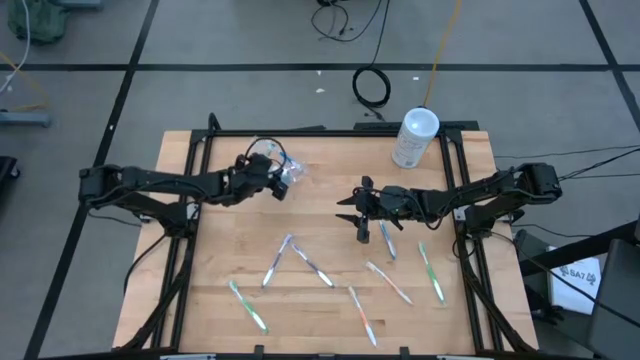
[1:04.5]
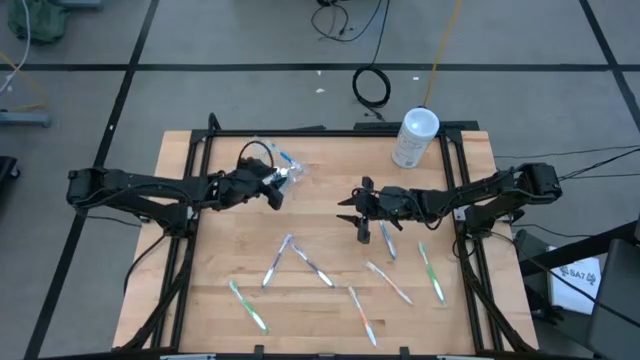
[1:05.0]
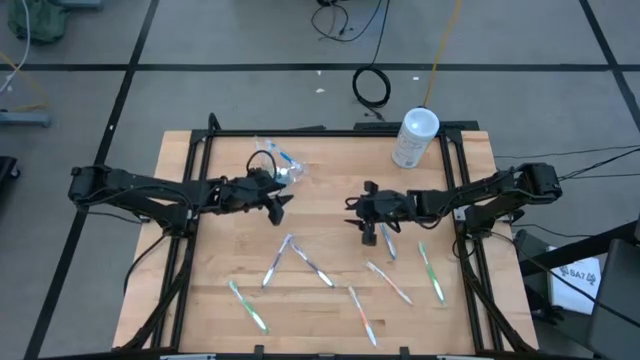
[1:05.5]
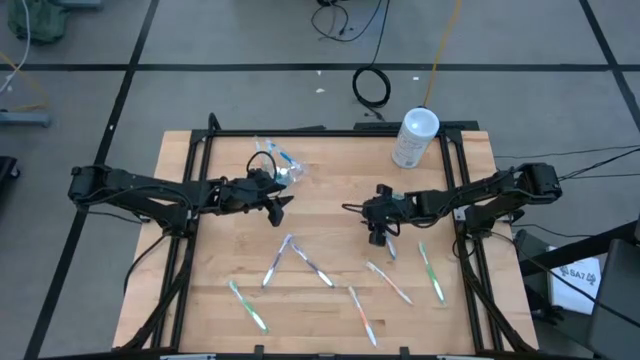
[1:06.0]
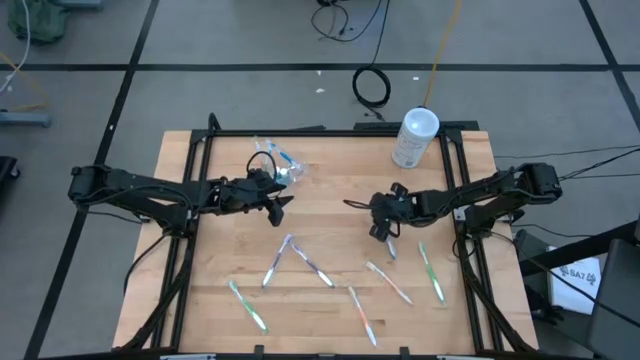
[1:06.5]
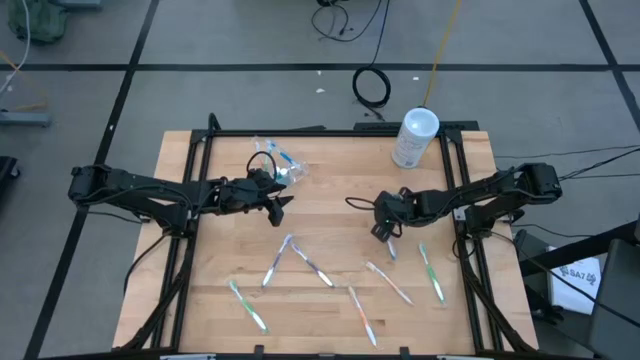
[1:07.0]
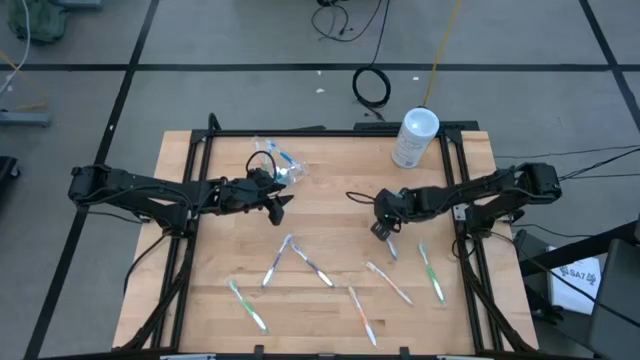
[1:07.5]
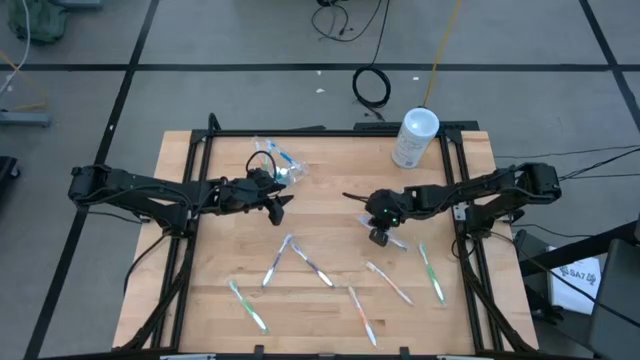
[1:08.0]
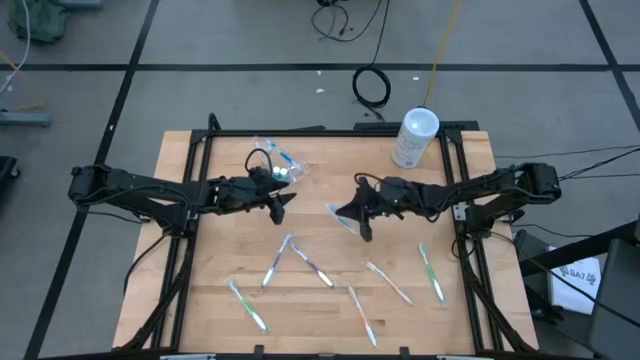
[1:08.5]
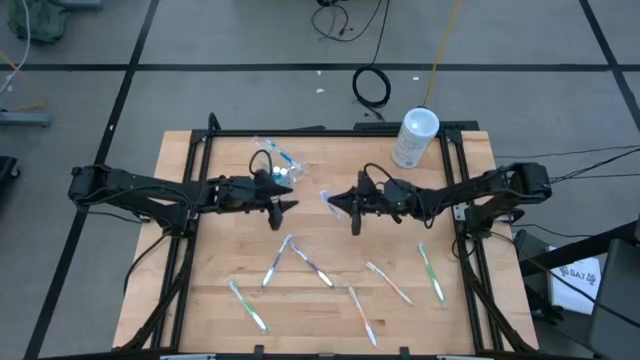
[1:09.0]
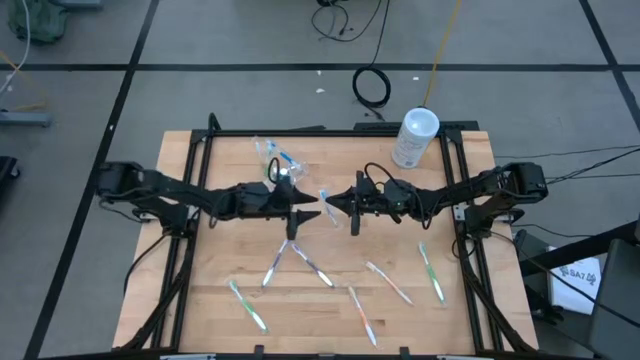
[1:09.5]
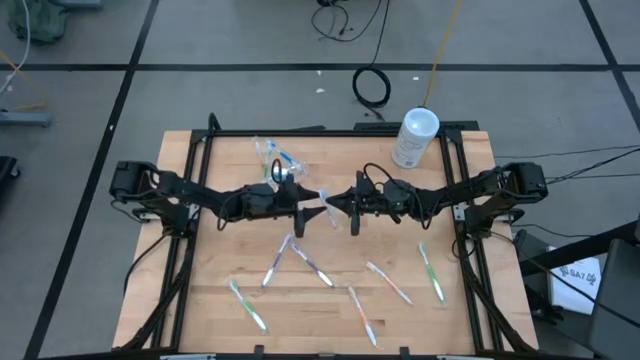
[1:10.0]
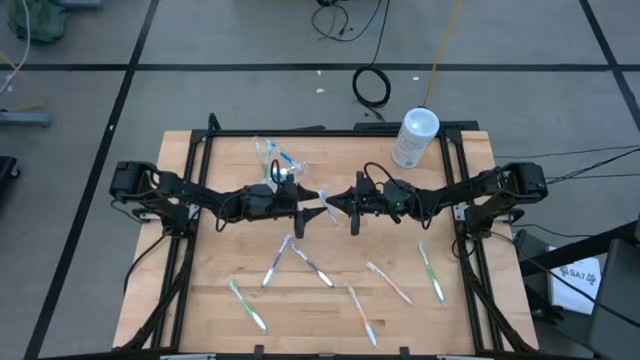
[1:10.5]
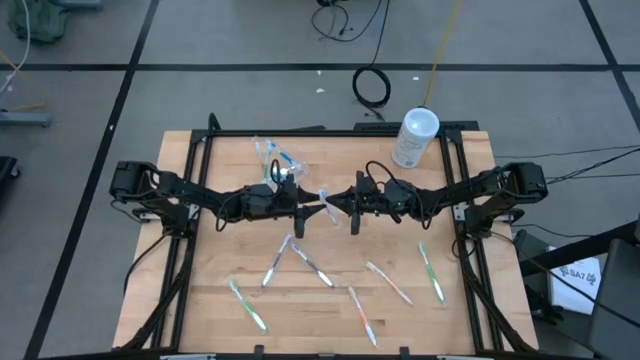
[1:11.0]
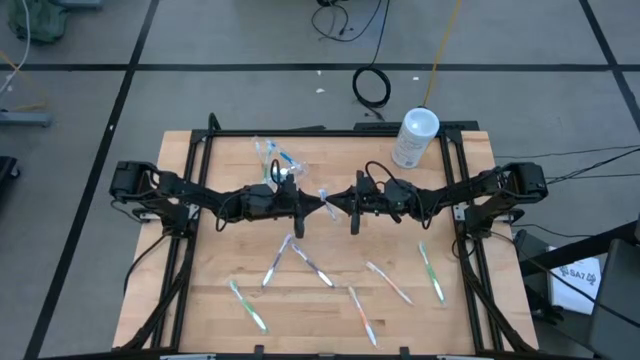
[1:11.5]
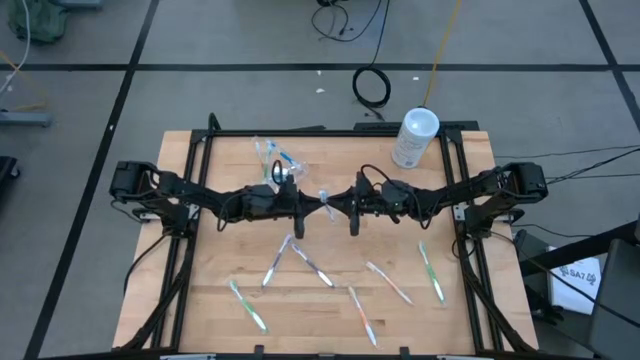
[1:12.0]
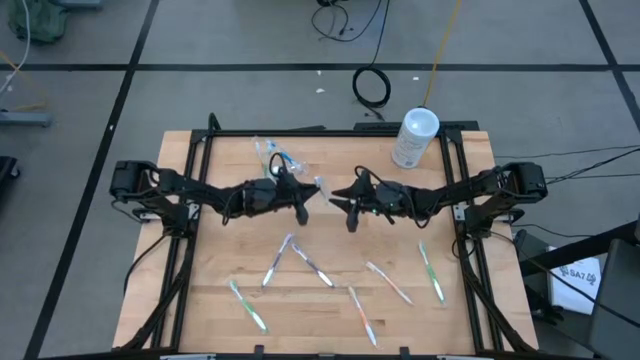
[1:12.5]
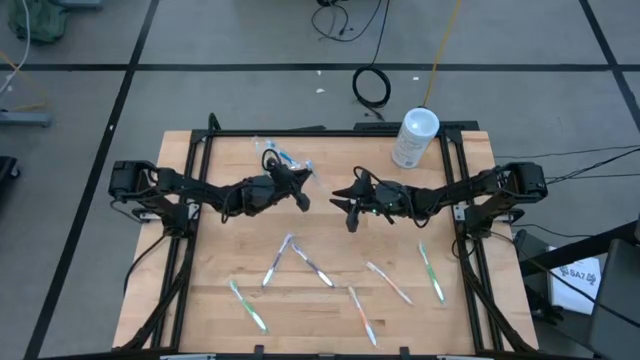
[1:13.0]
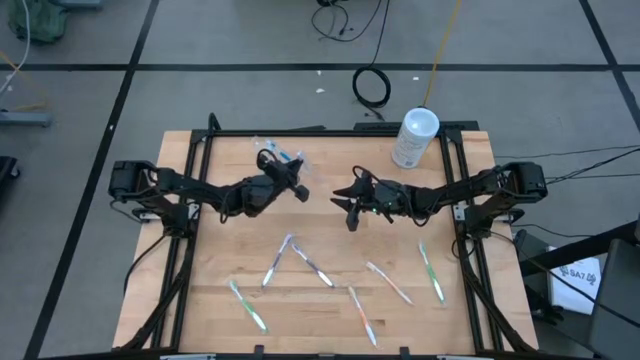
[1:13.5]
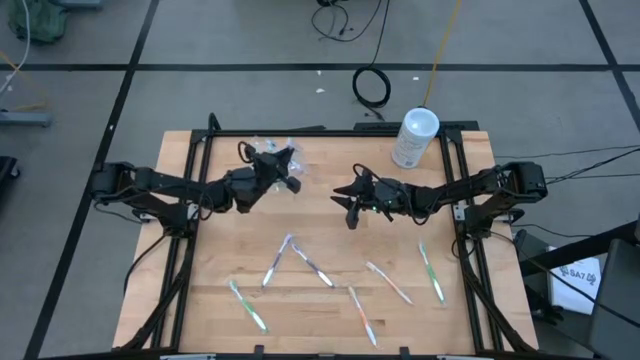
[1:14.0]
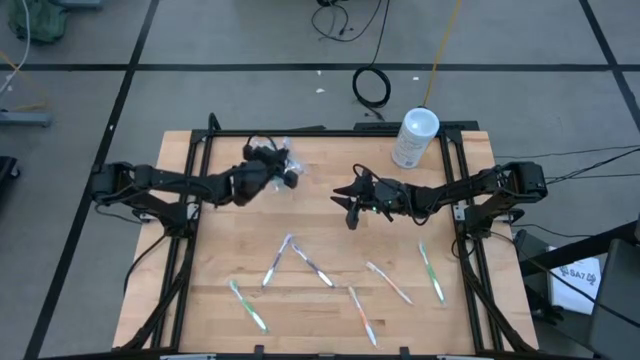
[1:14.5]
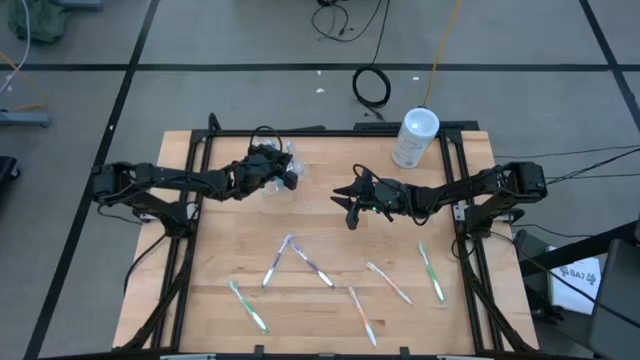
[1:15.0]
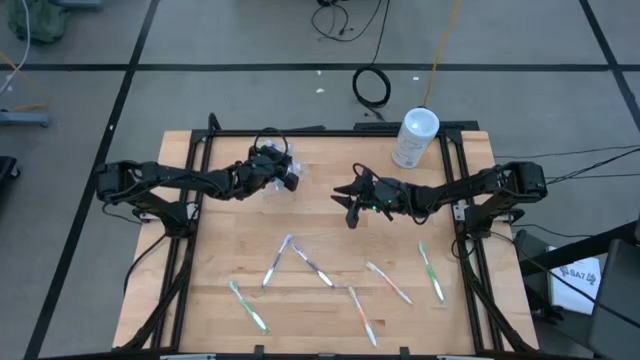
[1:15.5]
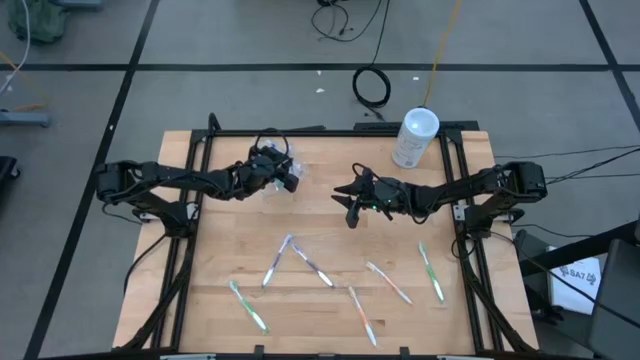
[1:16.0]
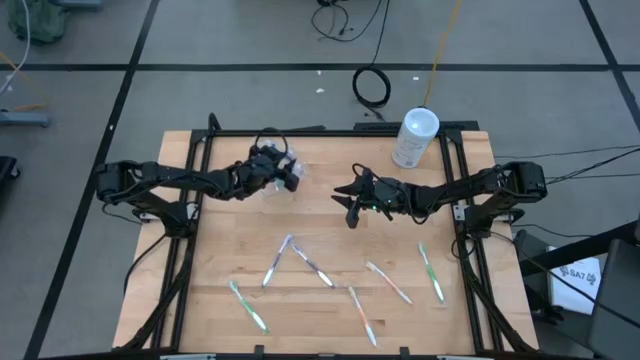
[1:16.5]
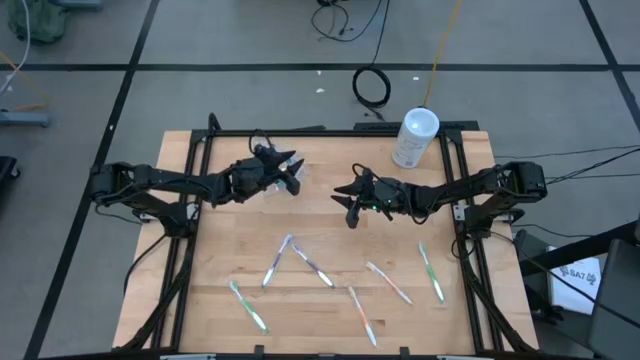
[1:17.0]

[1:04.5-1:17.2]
Task: Pick & Place toothbrushing station
Put the blue toothbrush into the transparent organizer

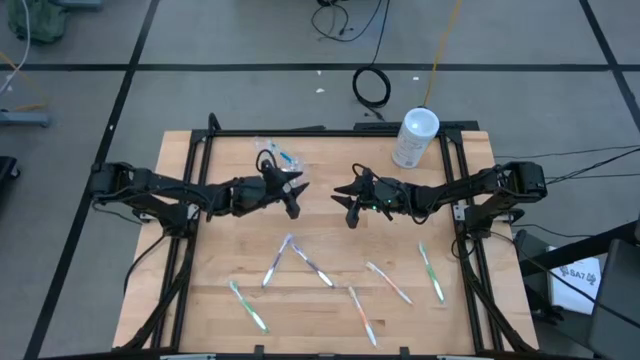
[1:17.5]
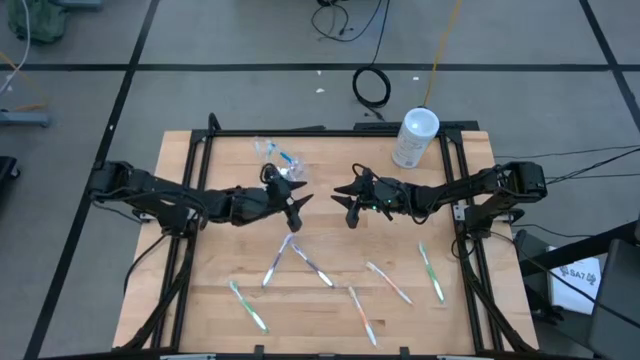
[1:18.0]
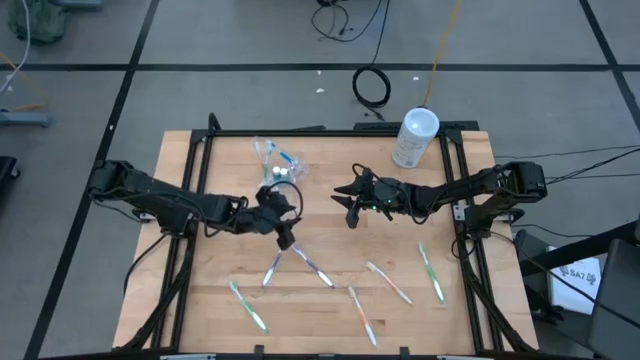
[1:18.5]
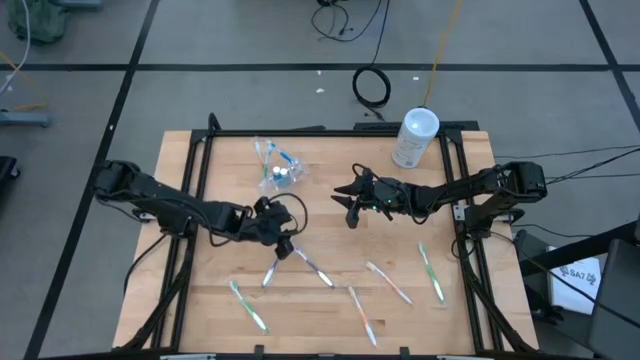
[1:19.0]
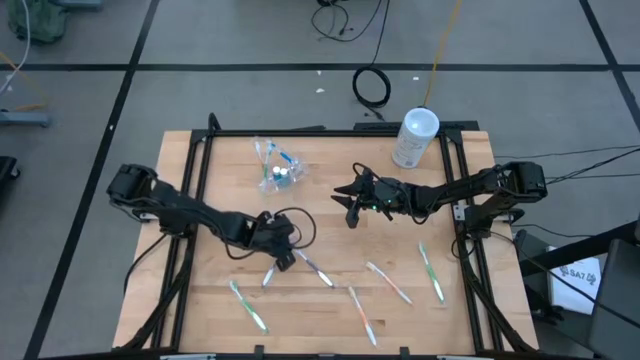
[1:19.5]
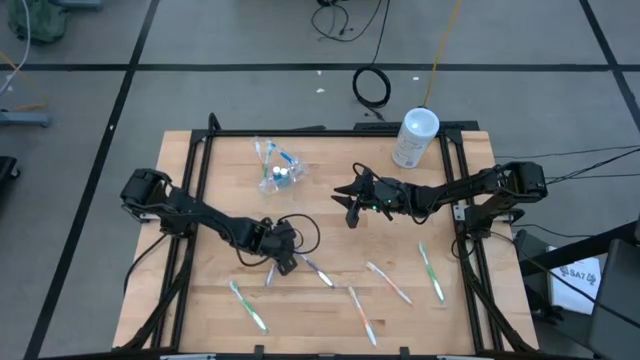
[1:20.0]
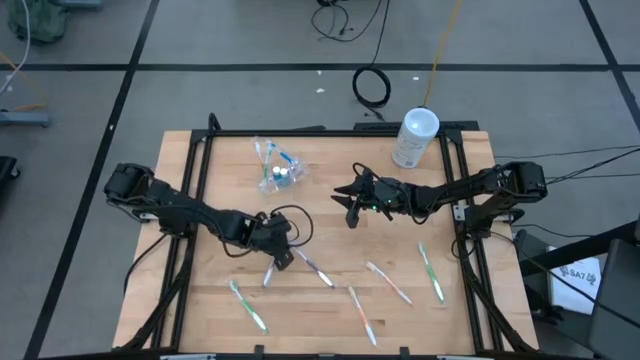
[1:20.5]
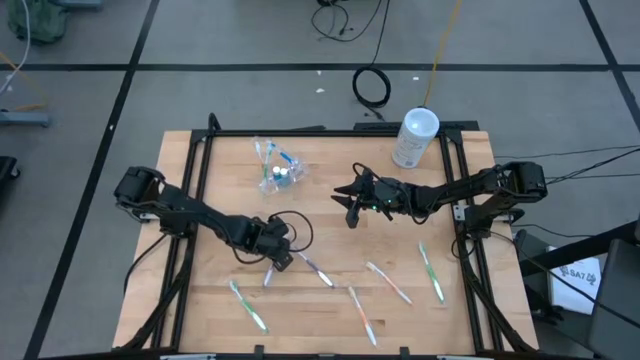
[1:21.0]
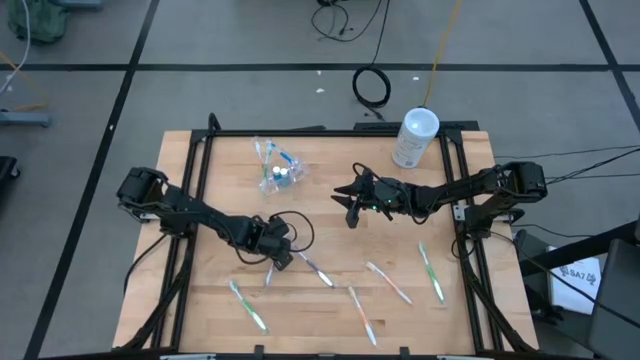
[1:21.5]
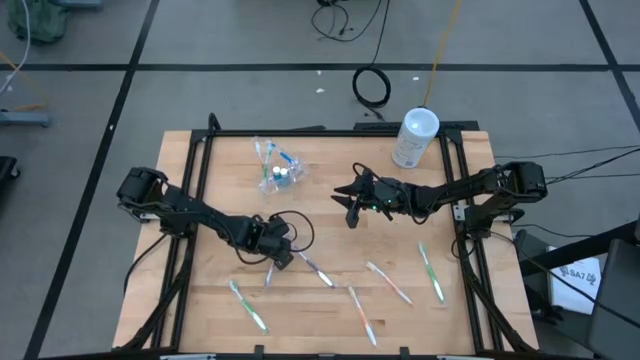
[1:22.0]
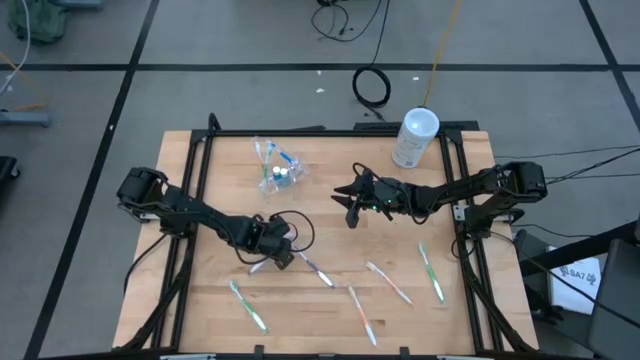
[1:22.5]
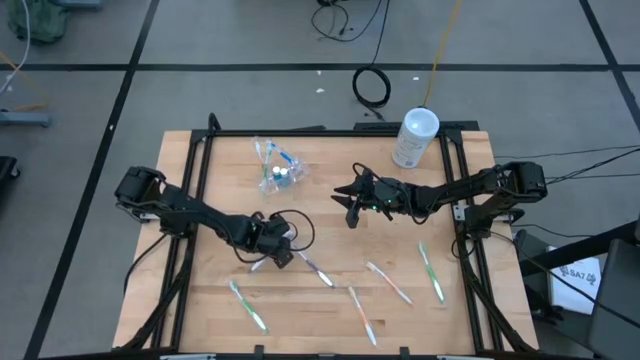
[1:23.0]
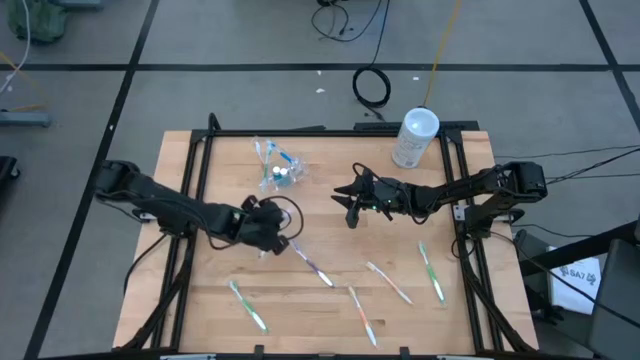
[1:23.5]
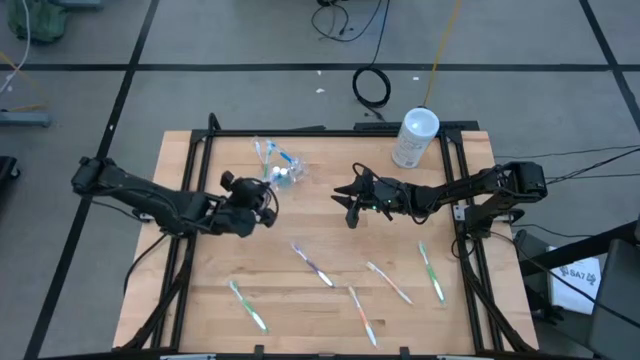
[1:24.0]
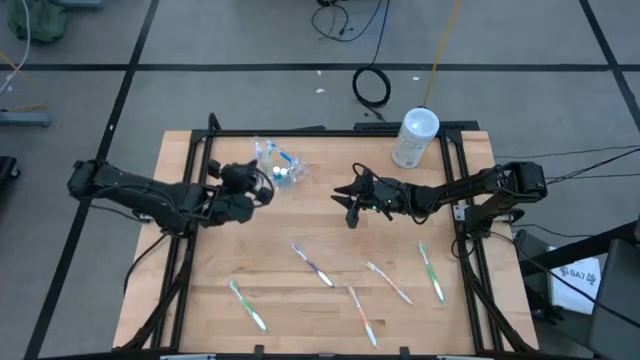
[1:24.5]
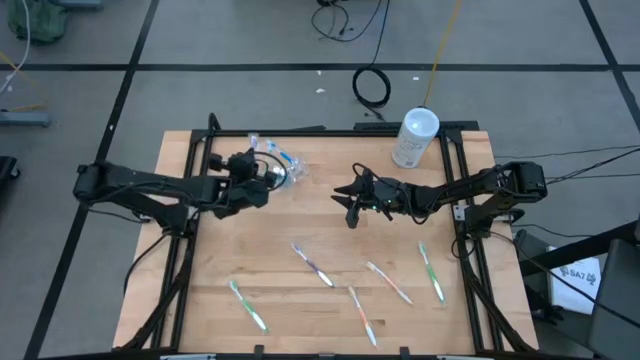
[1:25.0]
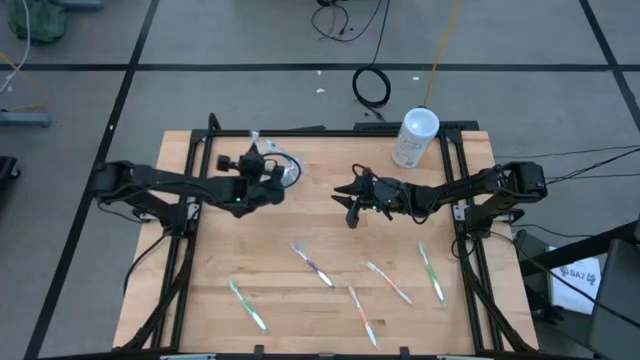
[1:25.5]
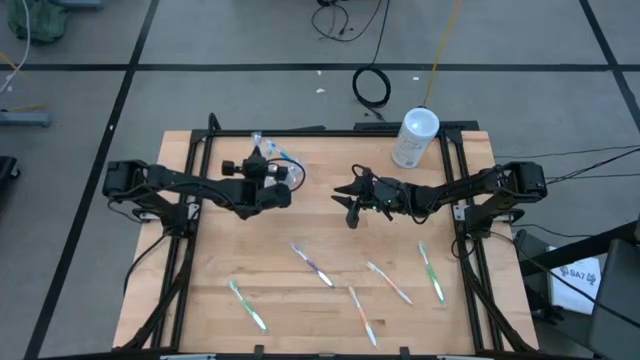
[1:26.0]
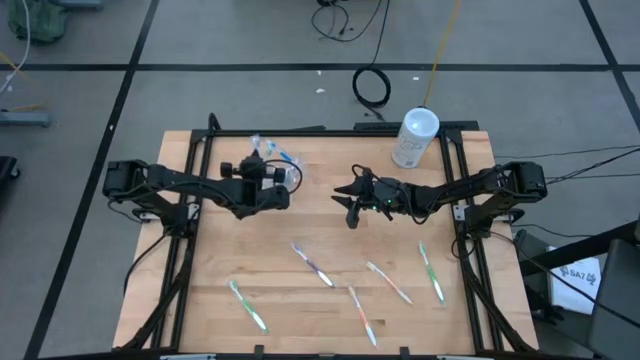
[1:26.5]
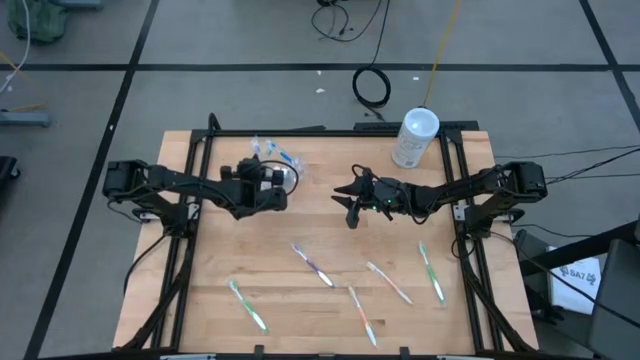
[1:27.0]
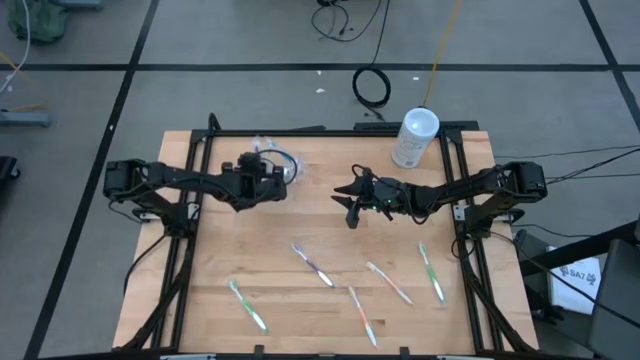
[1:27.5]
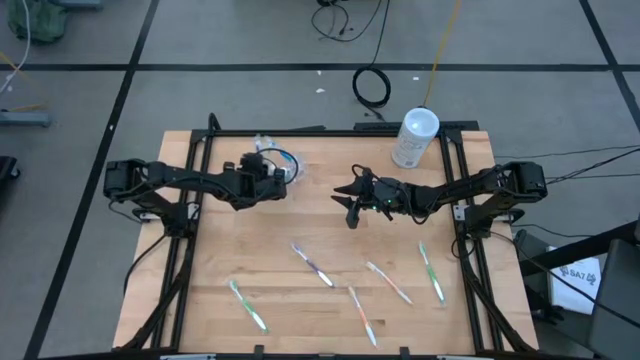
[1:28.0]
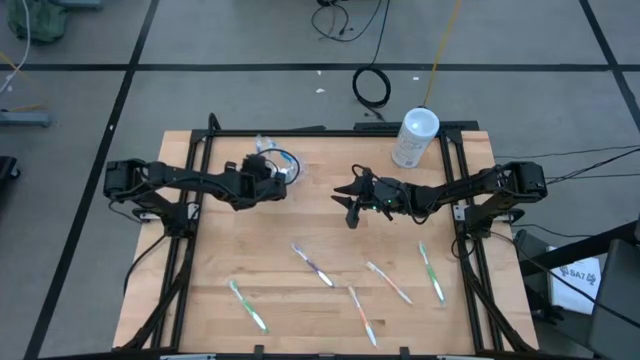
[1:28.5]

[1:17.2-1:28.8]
Put the violet toothbrush into the transparent organizer
